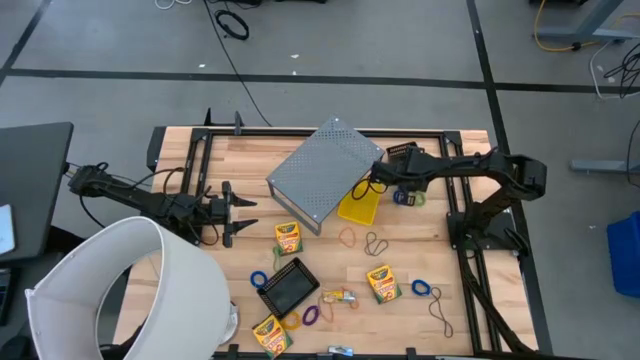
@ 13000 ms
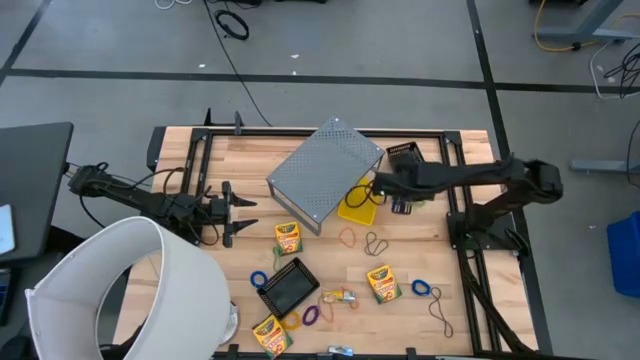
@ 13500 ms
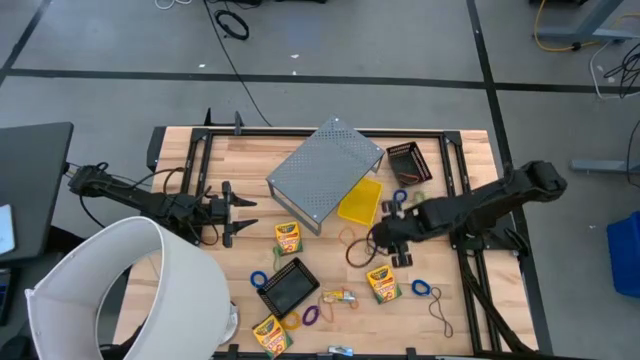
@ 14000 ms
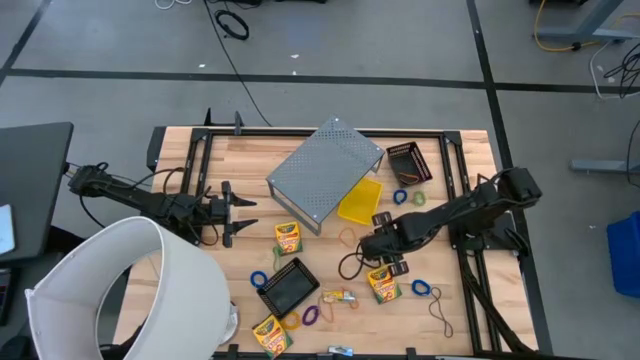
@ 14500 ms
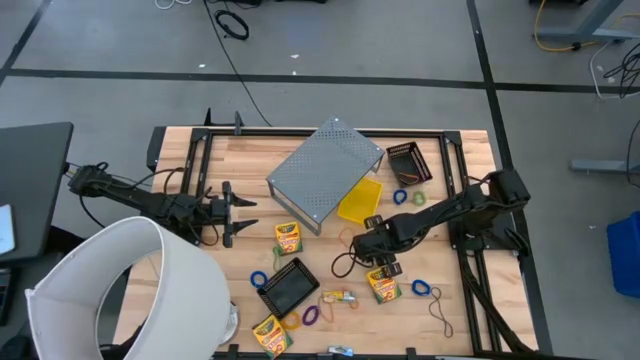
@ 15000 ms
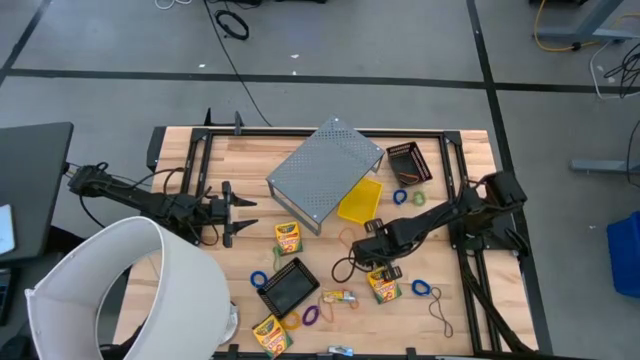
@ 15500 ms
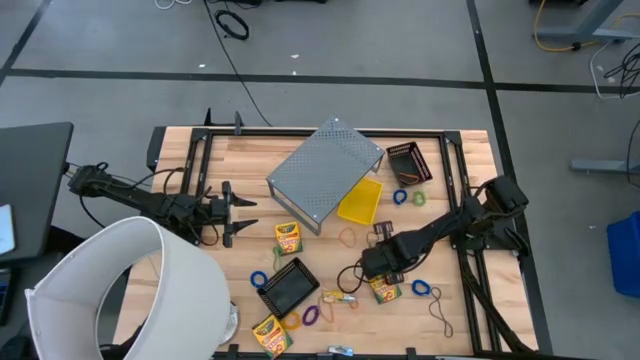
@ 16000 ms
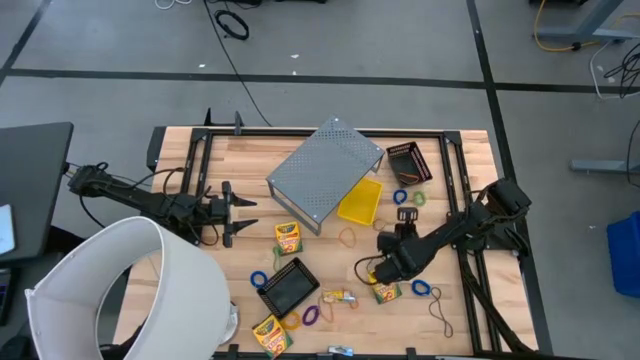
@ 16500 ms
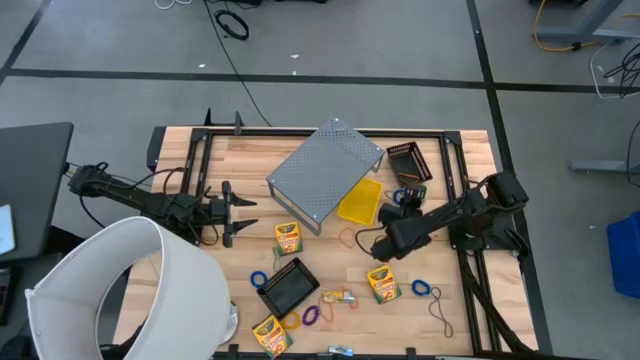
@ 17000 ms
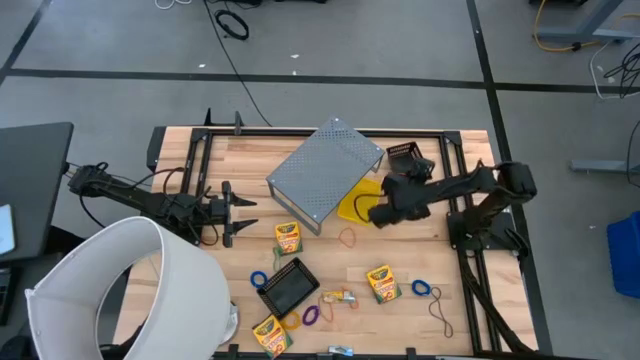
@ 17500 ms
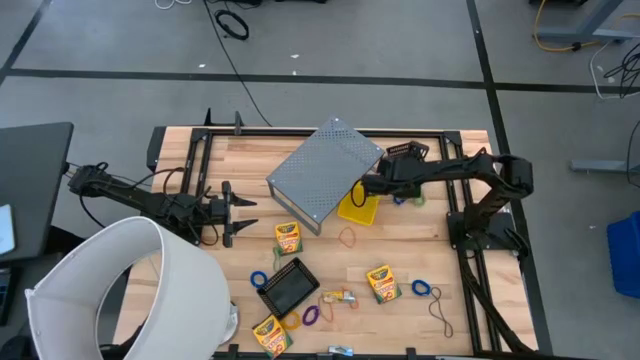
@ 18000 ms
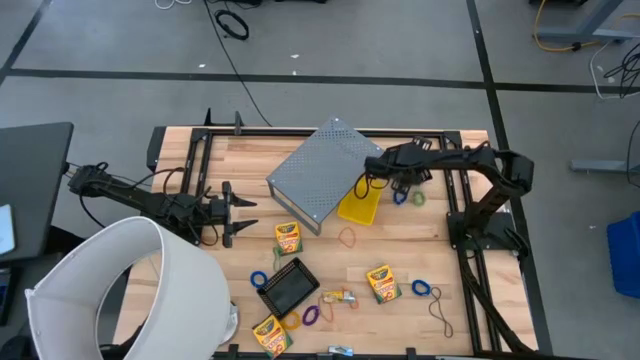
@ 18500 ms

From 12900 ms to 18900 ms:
Task: Pick & Place Office Desk Supplies
Put the purple rubber band into the top black bin

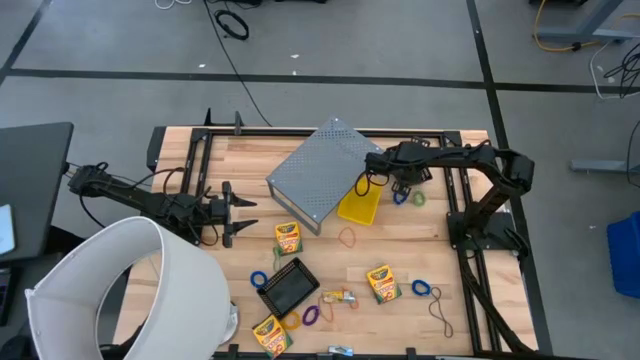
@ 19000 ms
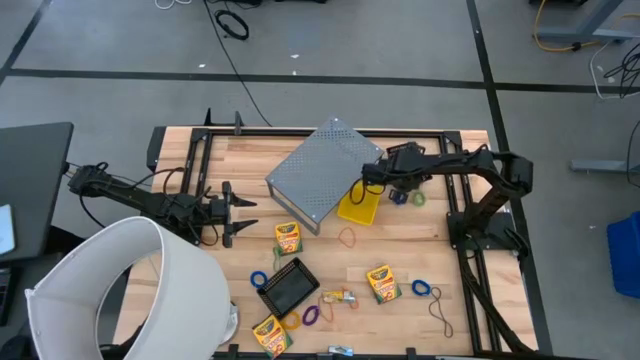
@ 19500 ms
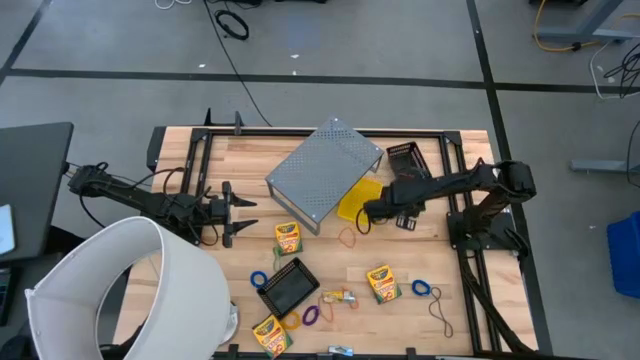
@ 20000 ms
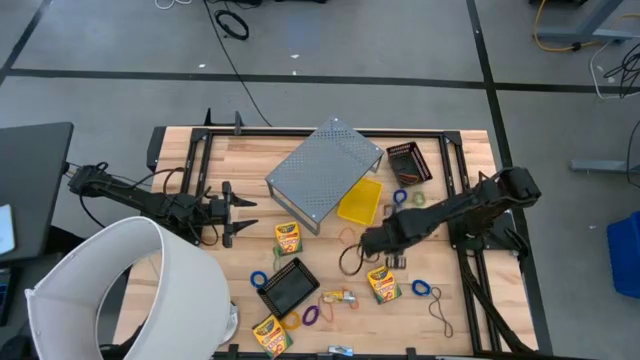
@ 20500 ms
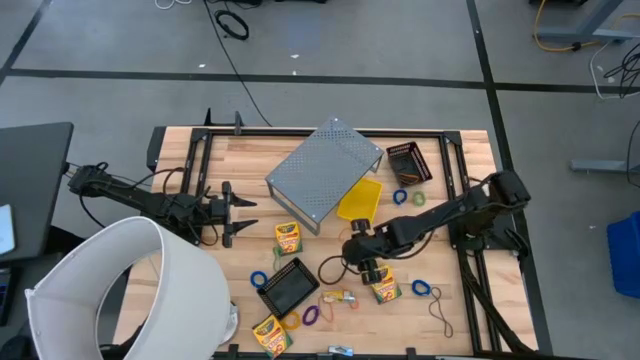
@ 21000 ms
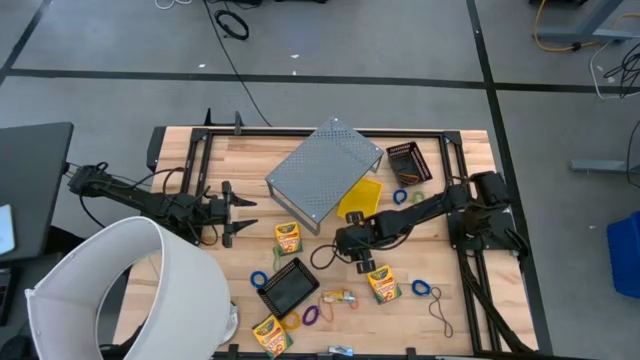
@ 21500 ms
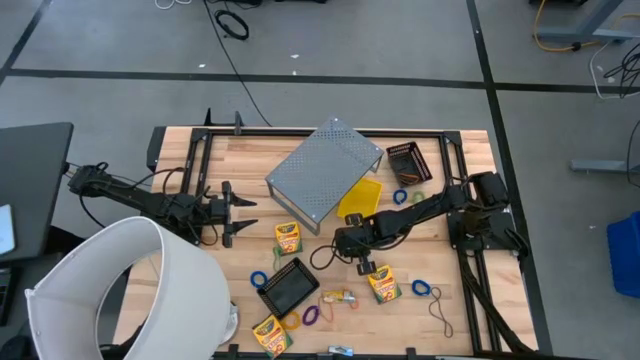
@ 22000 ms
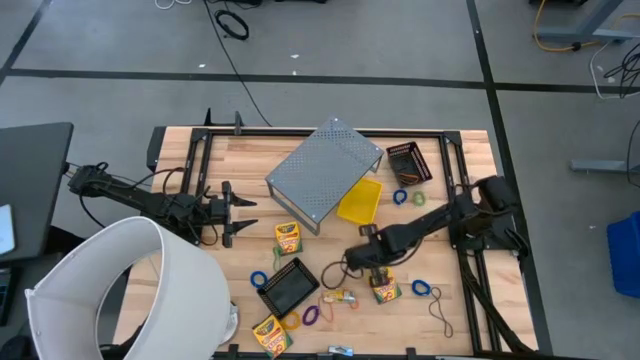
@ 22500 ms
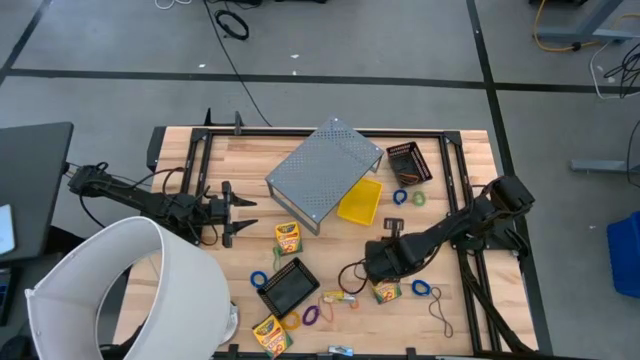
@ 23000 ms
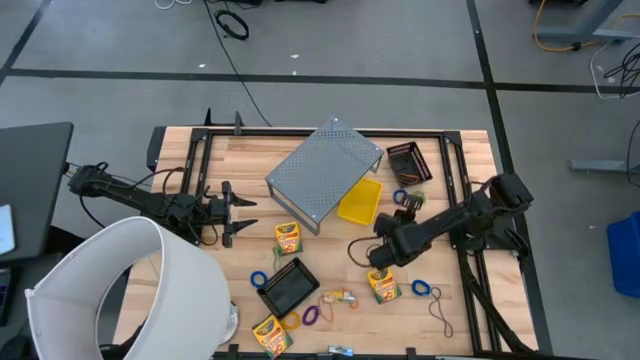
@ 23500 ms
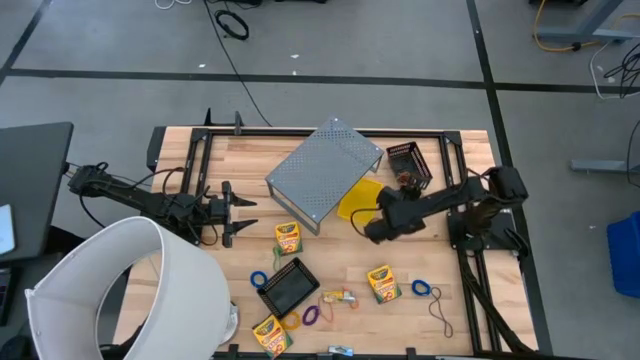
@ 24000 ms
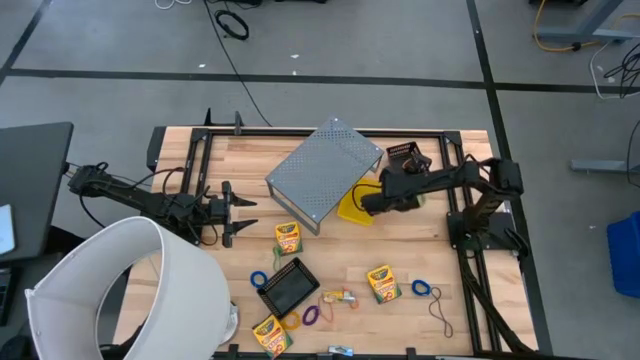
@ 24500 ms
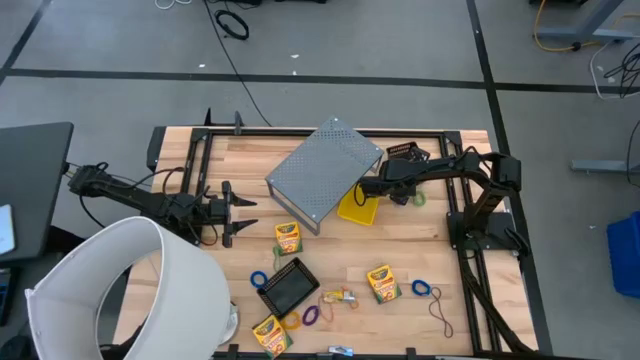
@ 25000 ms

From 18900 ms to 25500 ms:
Put the orange rubber band into the top black bin

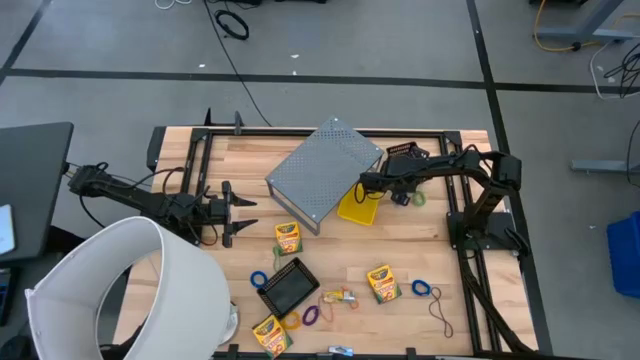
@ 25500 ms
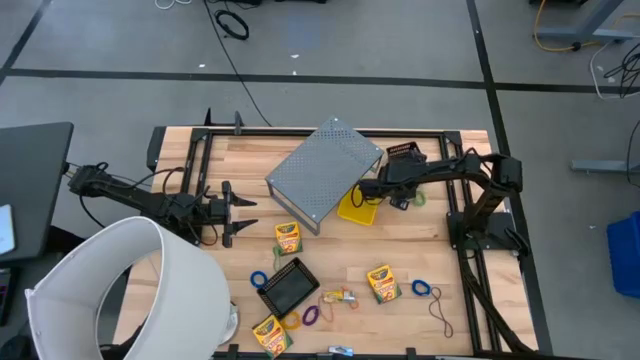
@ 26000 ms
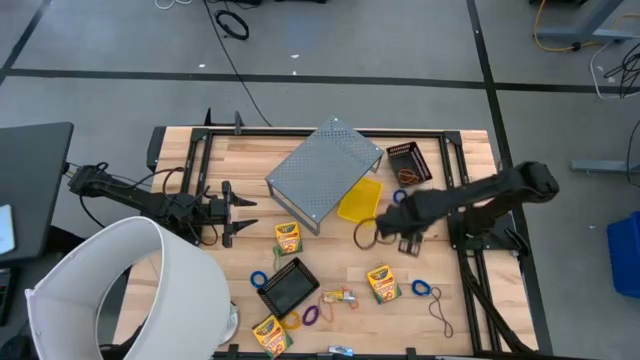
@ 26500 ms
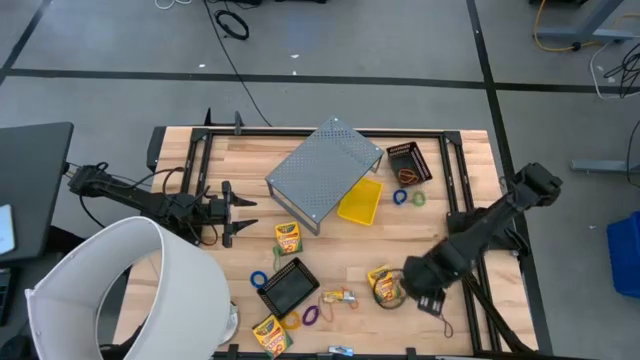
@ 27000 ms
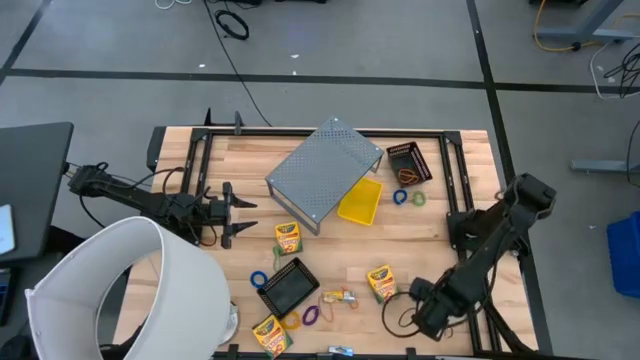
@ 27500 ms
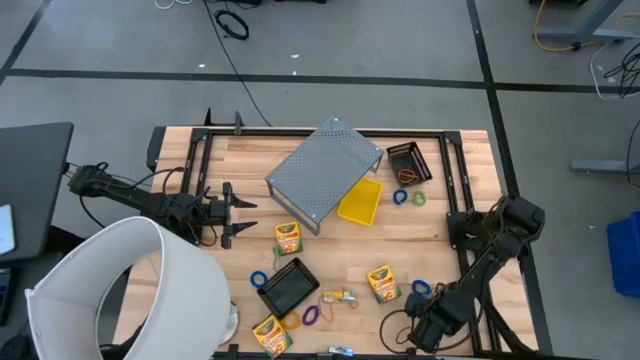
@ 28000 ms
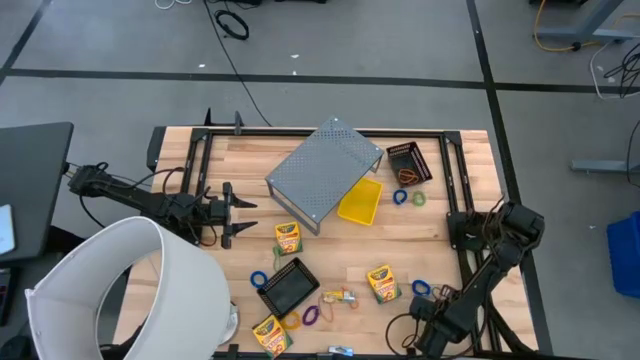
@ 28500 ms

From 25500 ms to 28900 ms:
Put the purple rubber band into the top black bin

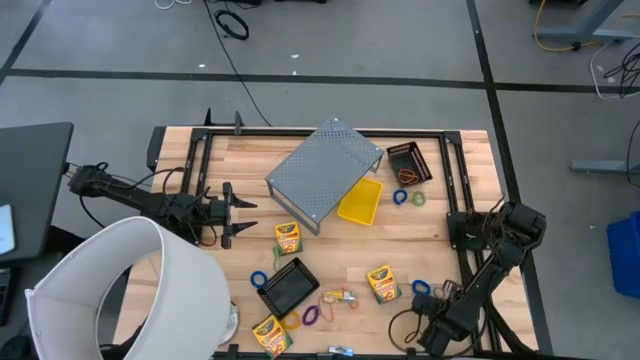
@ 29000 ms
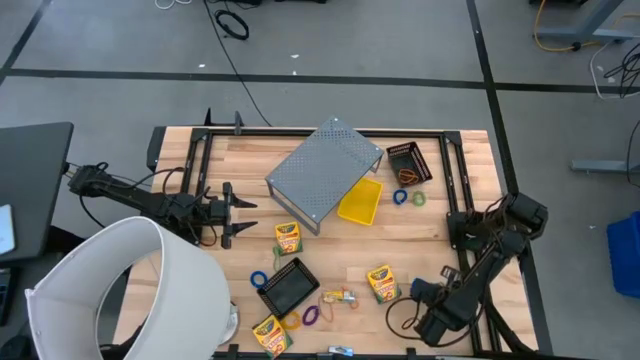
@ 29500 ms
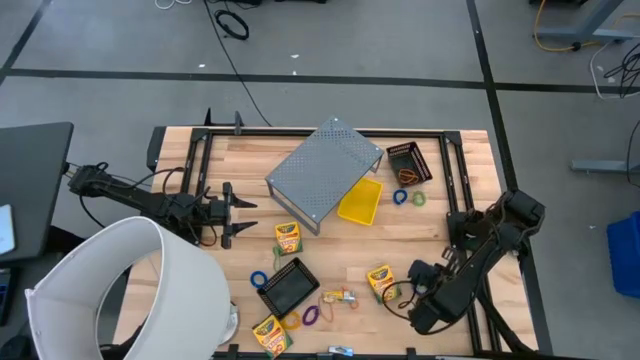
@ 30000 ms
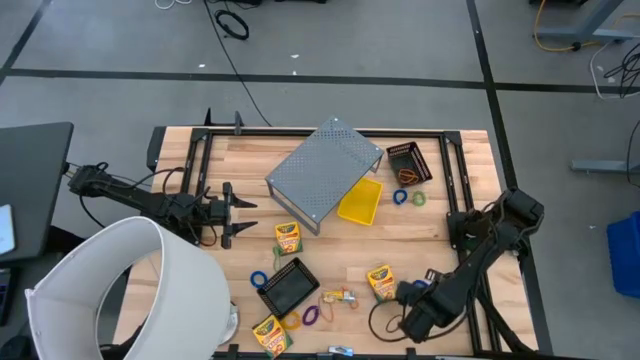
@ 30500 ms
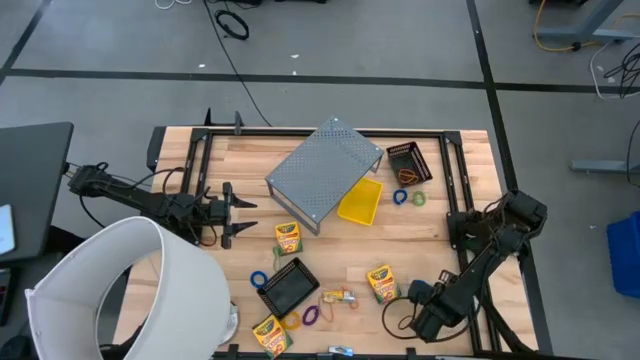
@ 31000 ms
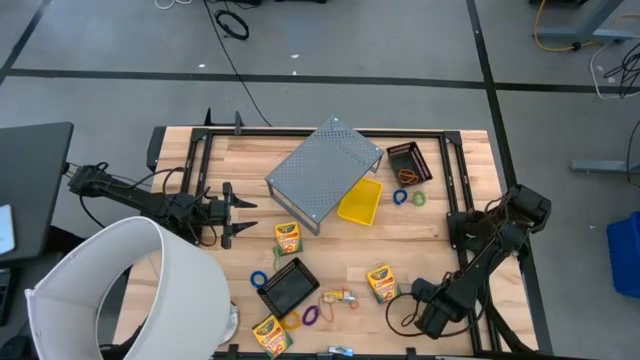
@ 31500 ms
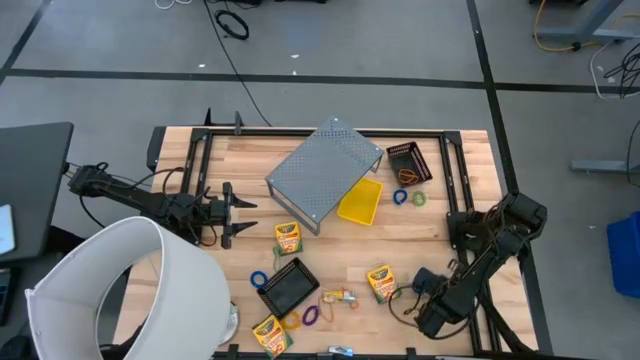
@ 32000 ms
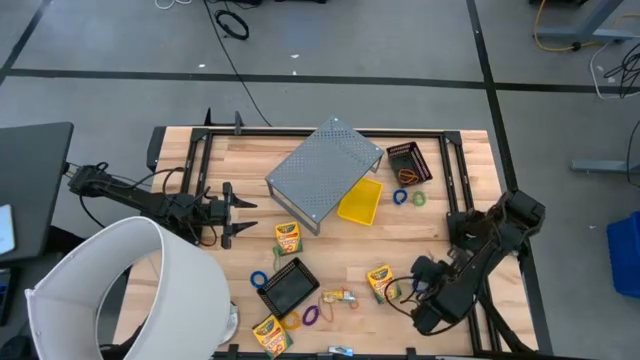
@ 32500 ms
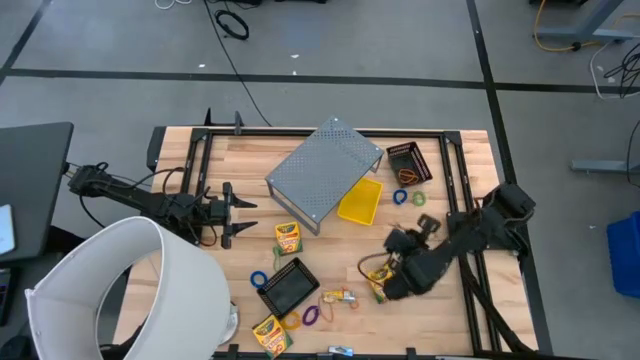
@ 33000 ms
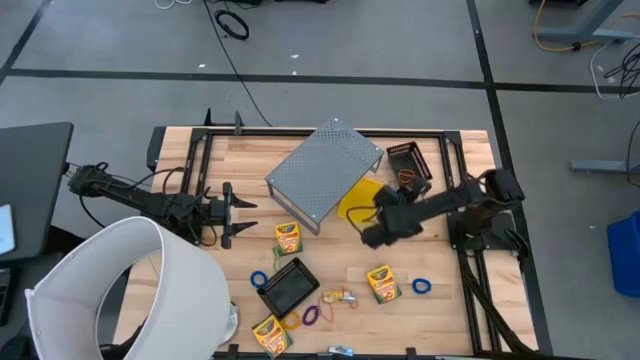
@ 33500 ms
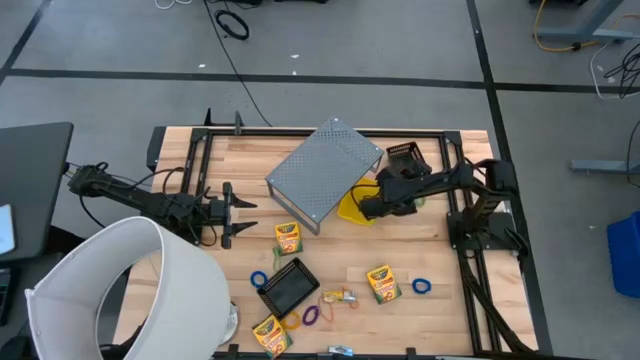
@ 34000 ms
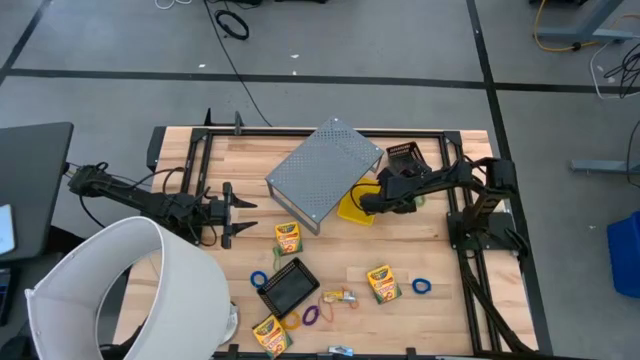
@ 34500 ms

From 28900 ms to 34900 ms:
Put the purple rubber band into the top black bin
